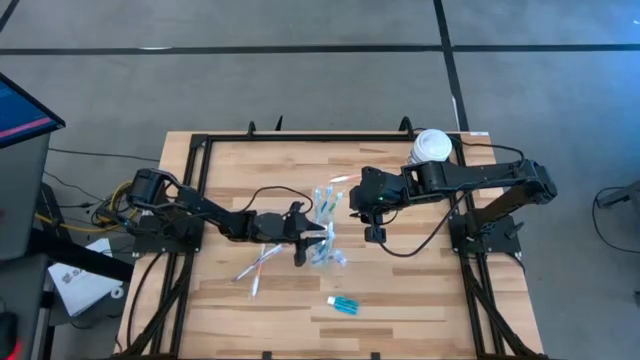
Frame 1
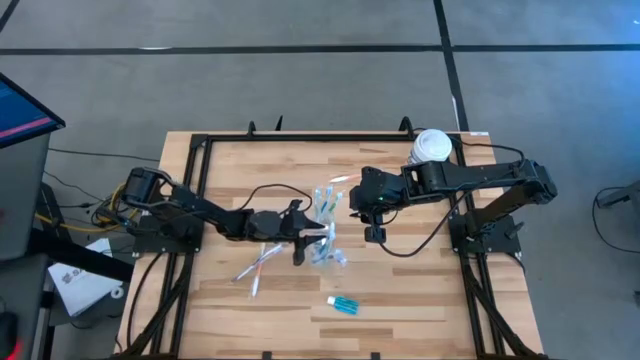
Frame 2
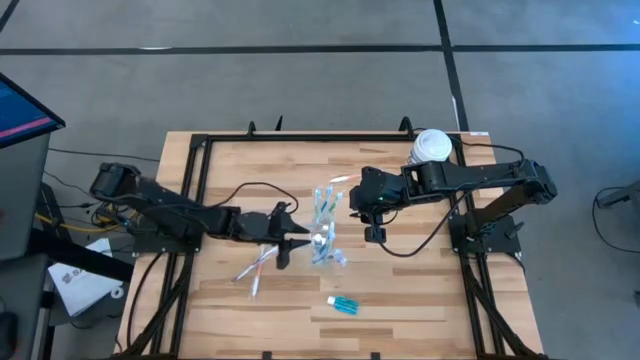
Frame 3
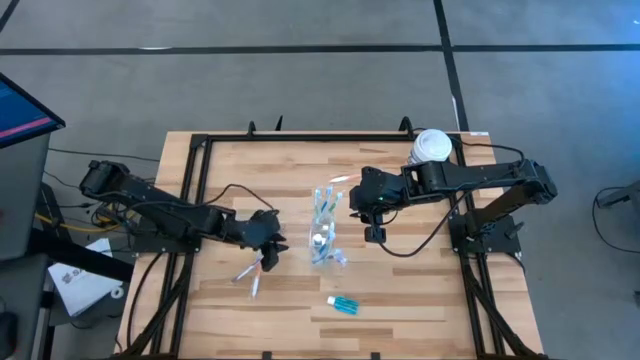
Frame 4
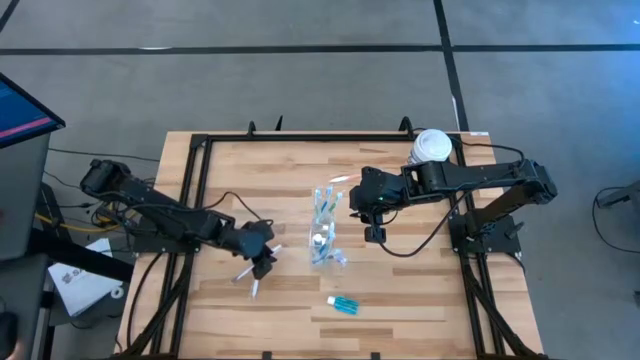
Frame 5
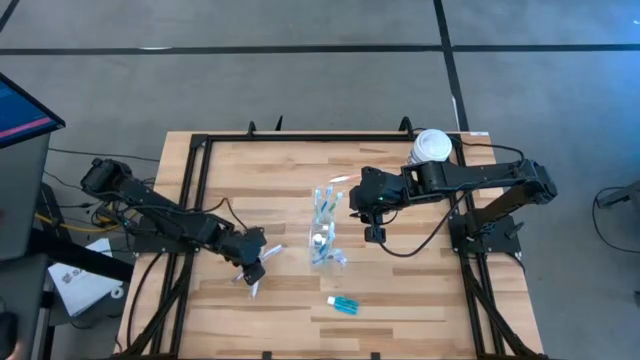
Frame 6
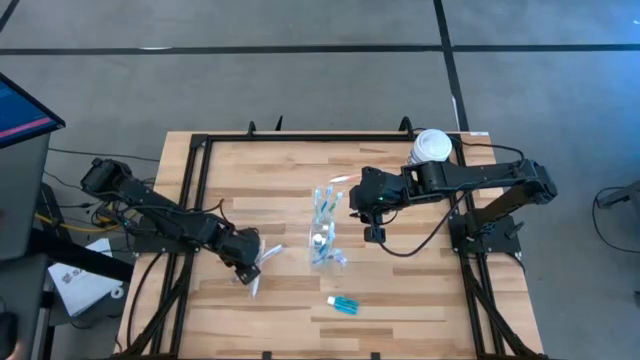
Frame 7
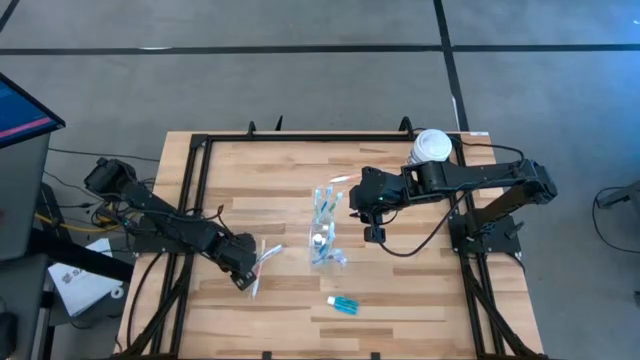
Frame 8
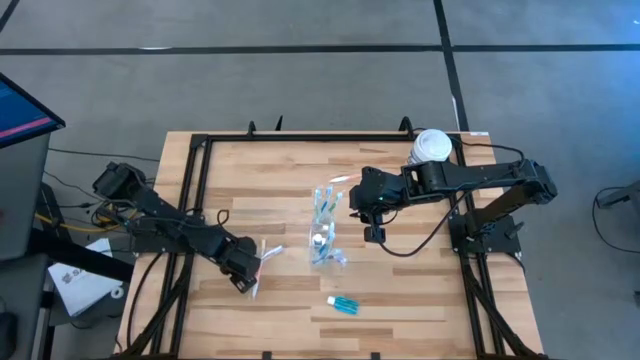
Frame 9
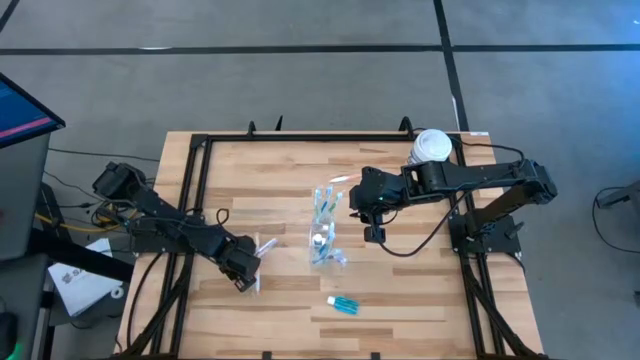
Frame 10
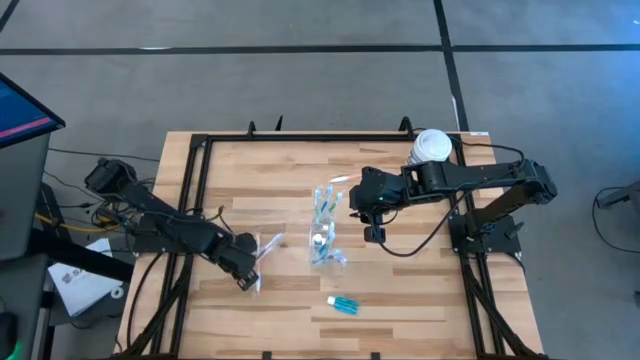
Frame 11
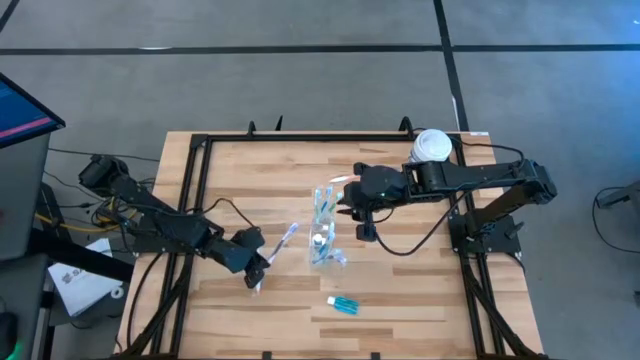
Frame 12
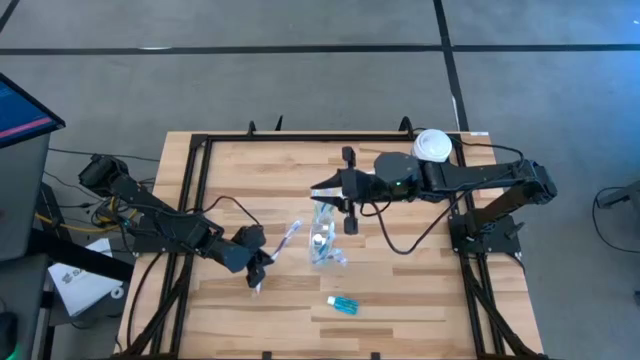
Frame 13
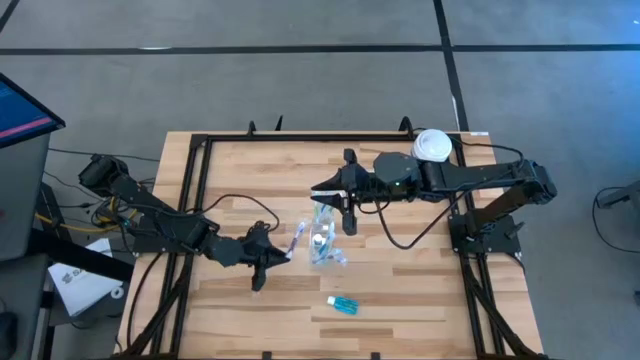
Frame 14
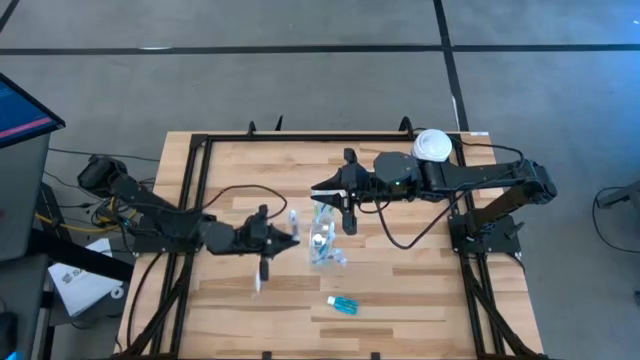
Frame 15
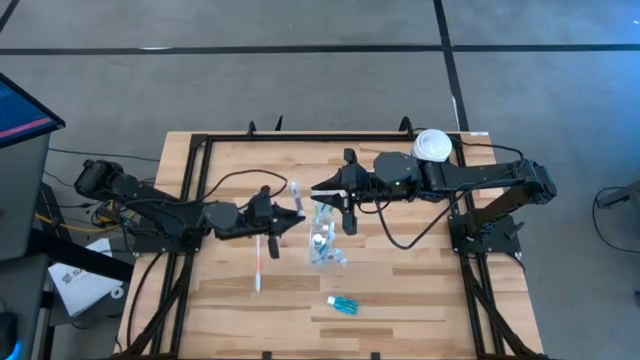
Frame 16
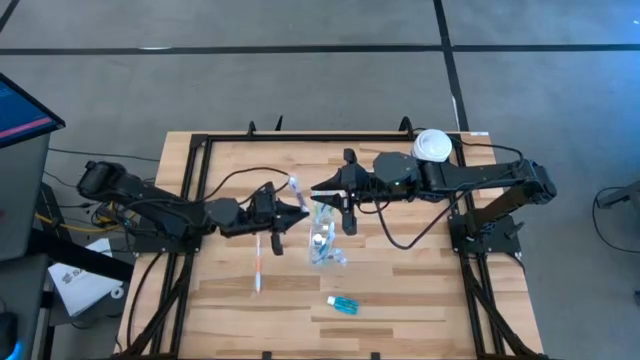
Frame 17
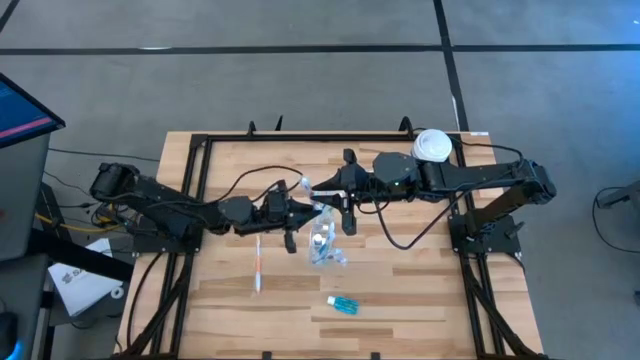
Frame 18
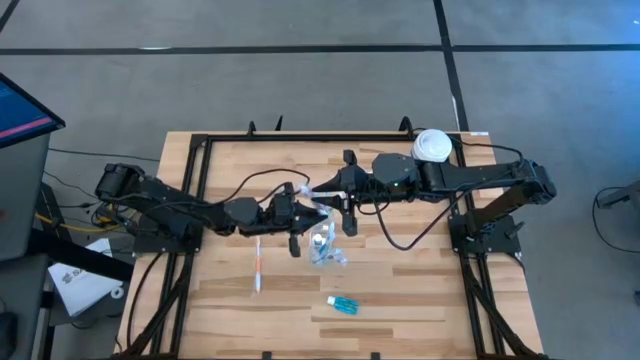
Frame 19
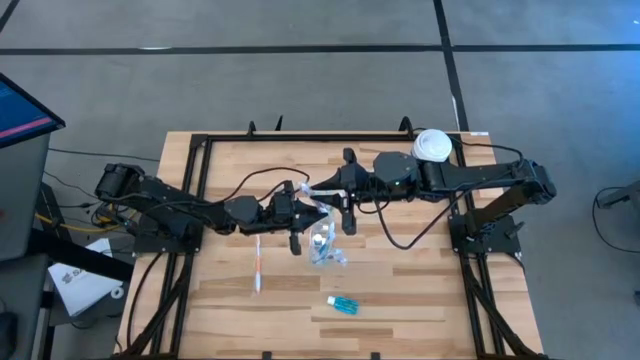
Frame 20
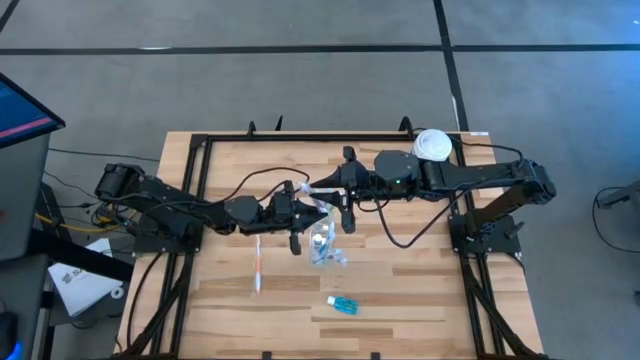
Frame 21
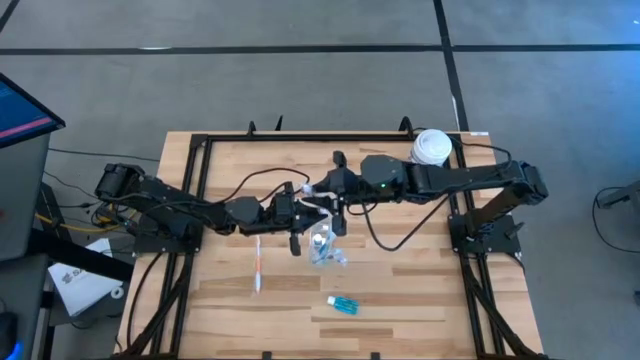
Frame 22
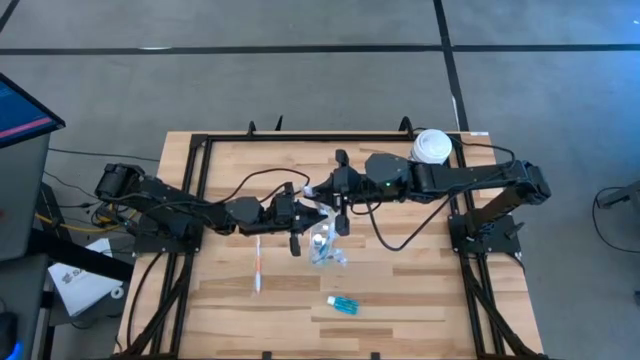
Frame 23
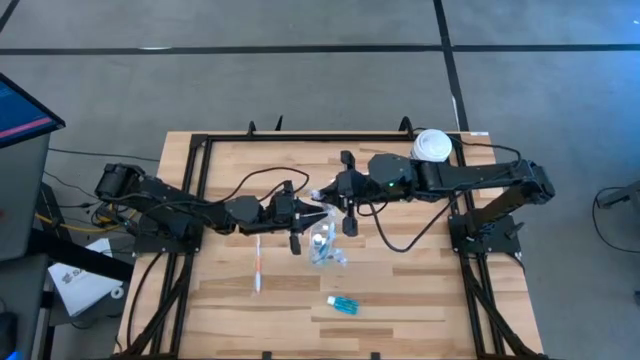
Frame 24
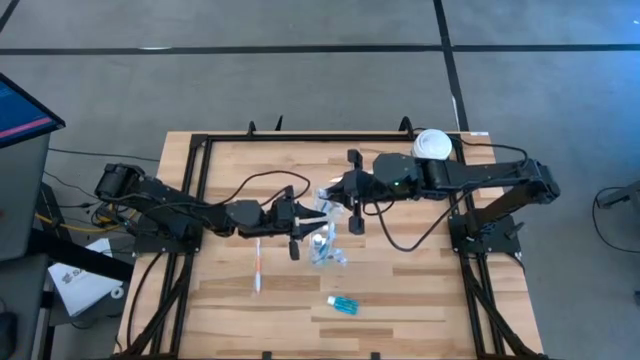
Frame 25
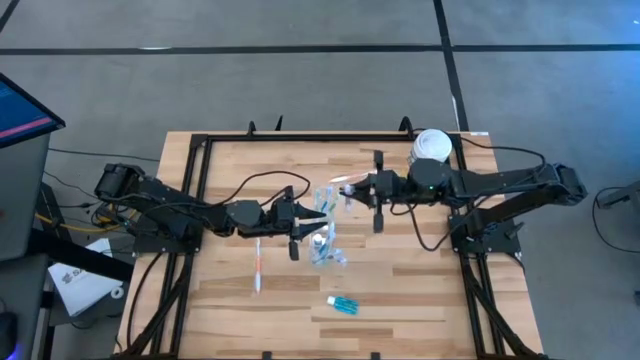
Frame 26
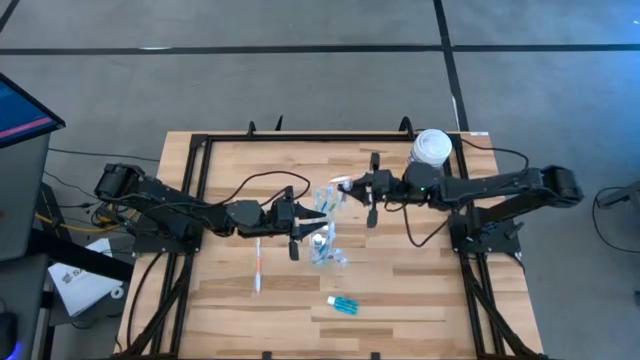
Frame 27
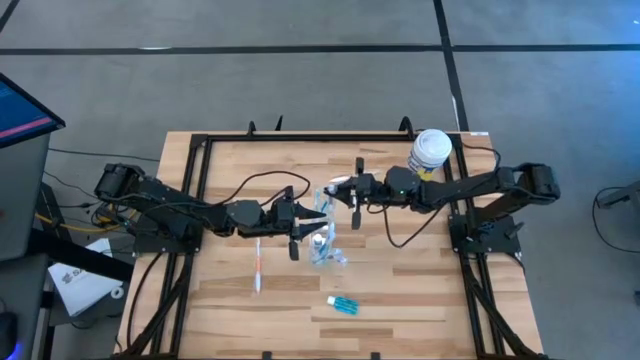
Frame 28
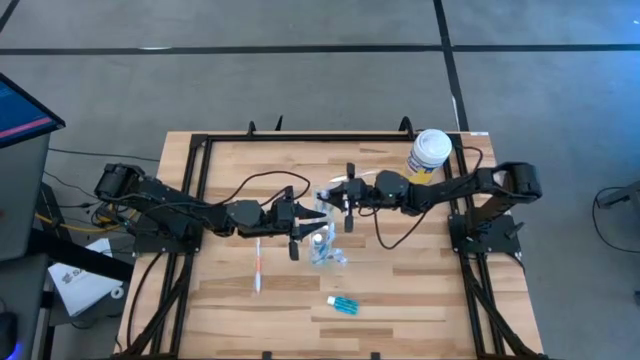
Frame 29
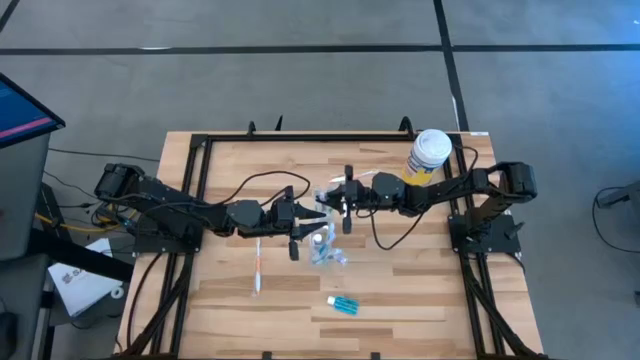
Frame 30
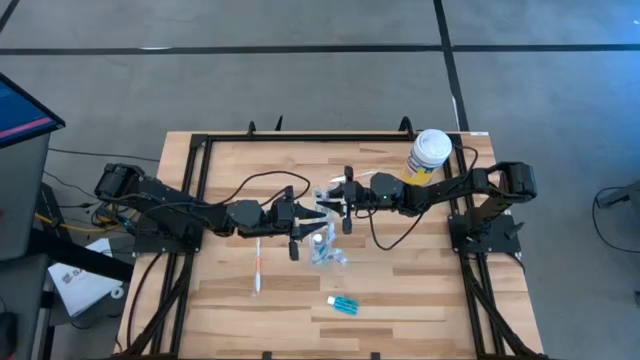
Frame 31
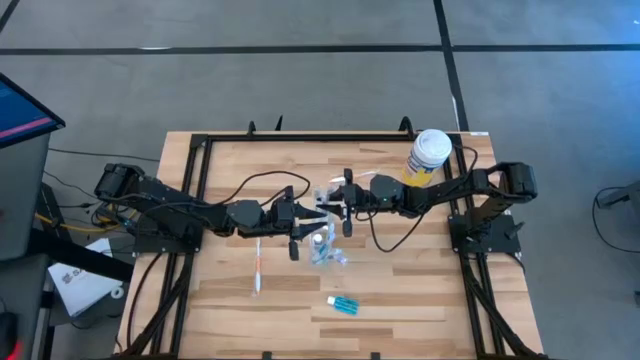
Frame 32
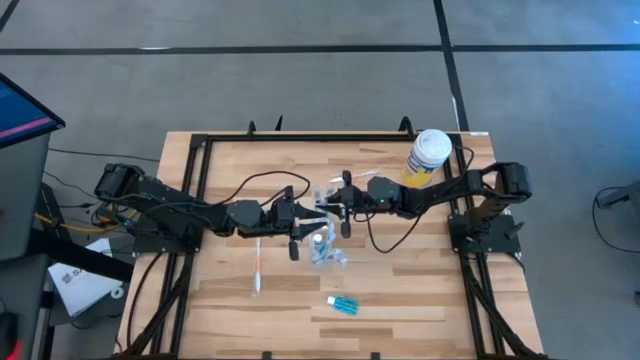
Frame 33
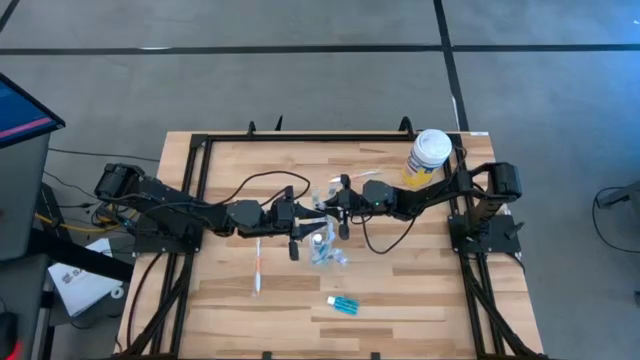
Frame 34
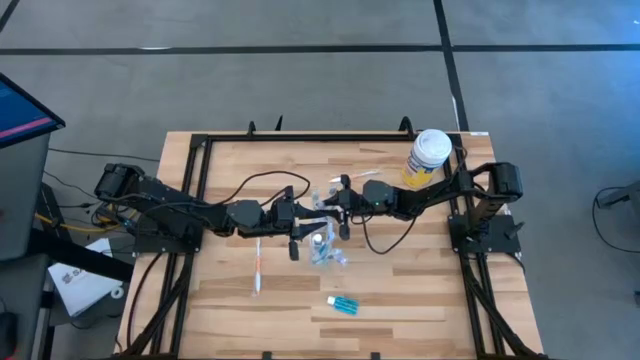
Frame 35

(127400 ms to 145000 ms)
Task: Pick & Place toothbrushing station
Put the violet toothbrush into the transparent organizer

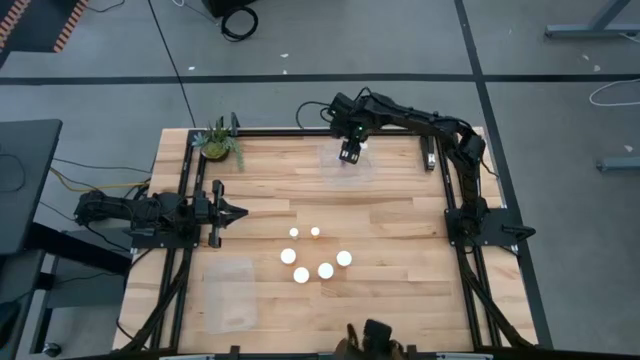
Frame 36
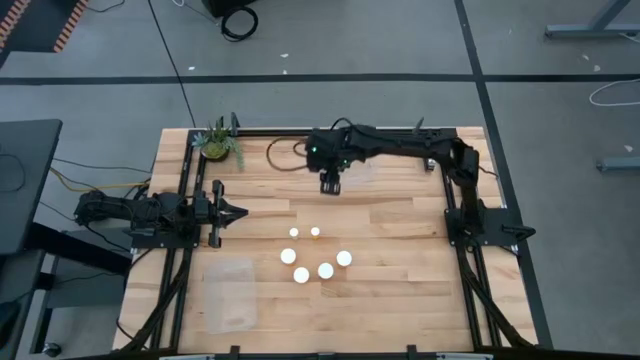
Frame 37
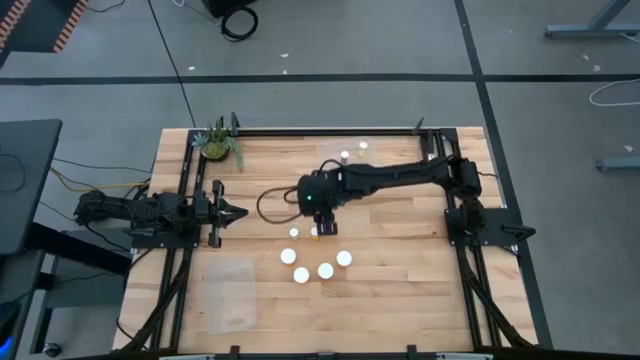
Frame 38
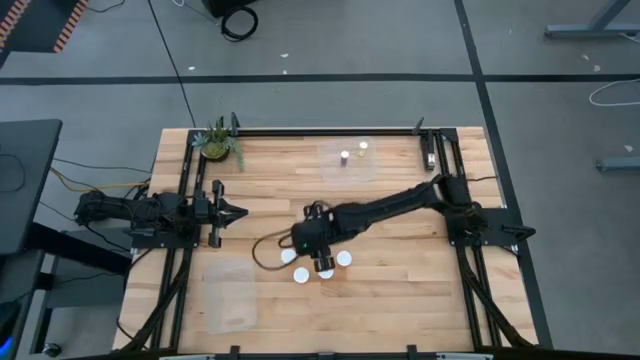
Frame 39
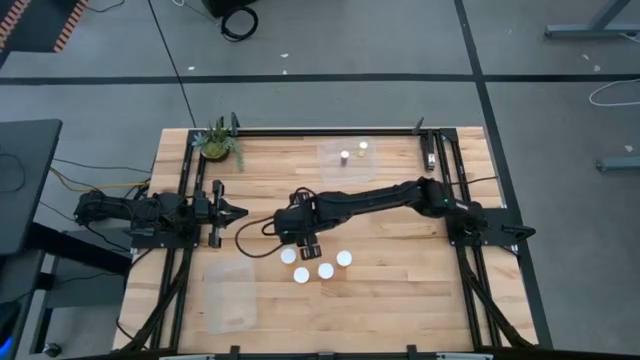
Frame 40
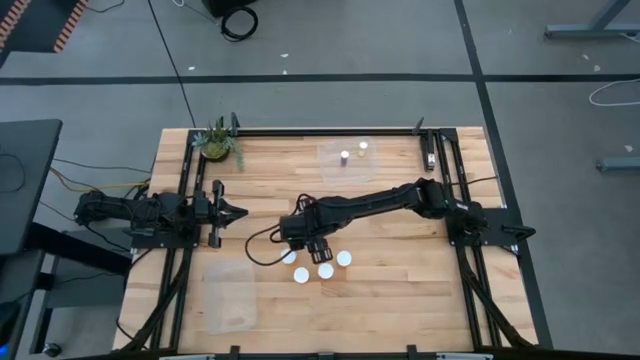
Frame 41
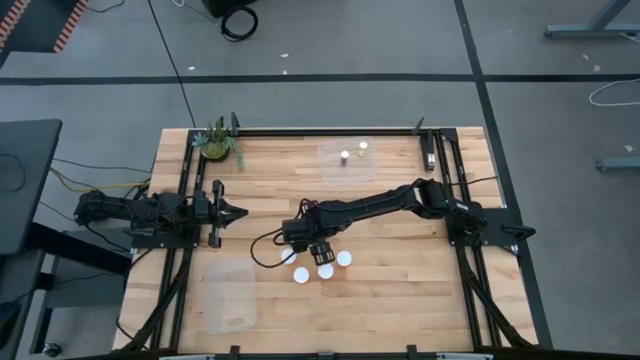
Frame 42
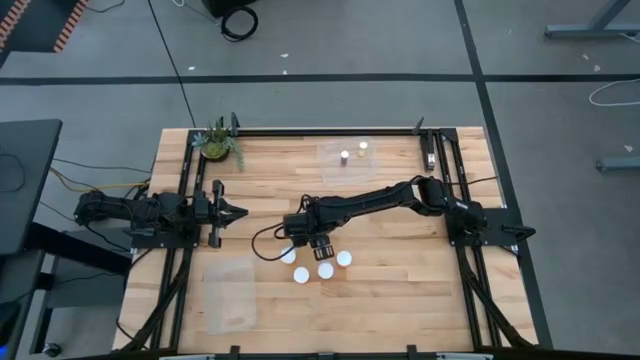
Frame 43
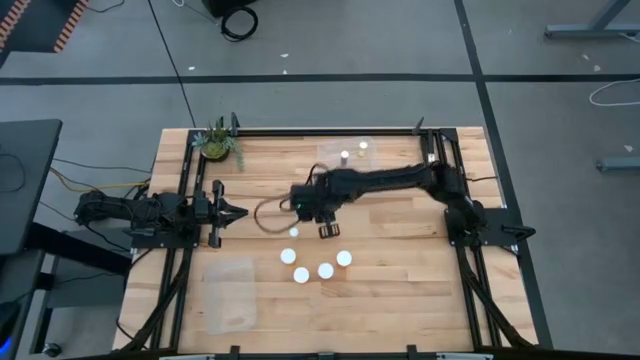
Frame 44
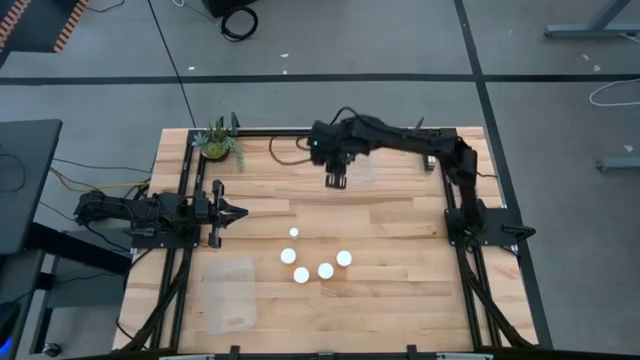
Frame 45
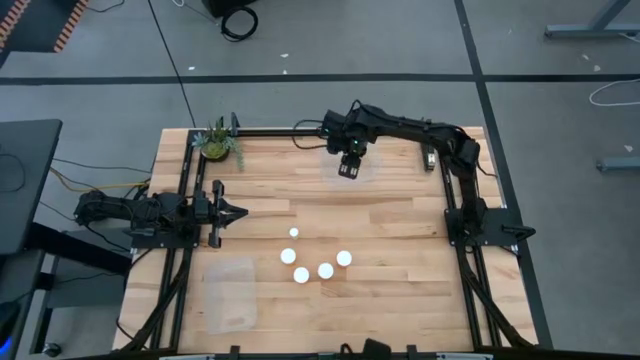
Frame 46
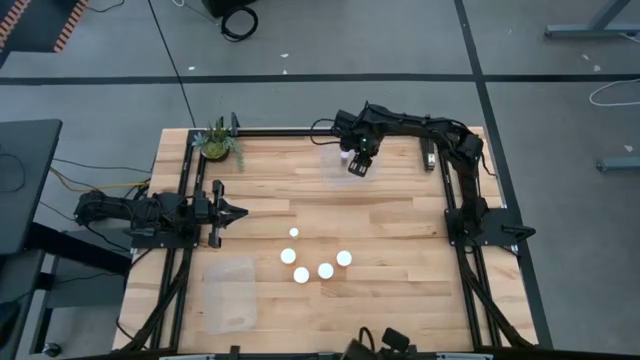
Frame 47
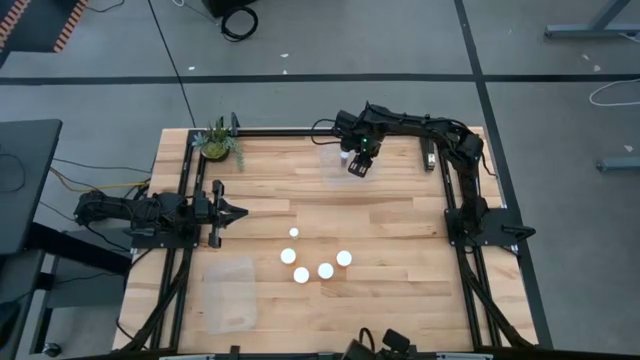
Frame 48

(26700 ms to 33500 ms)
Task: Pick and place medicine bottles into bin by pill shape (circle, oval)
Put the small orange pill bottle into the top transparent bin
